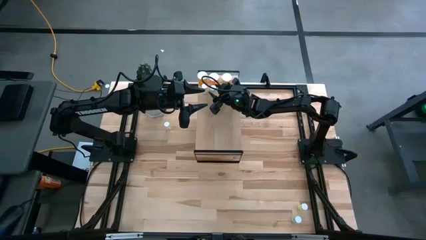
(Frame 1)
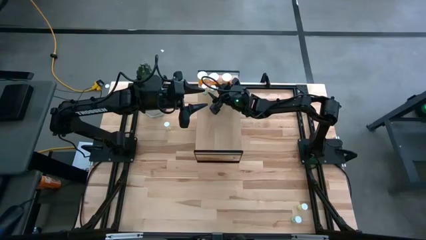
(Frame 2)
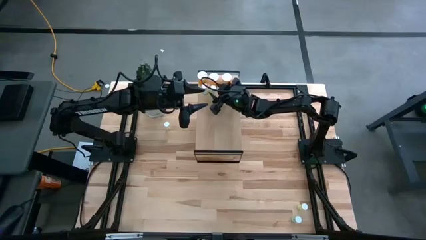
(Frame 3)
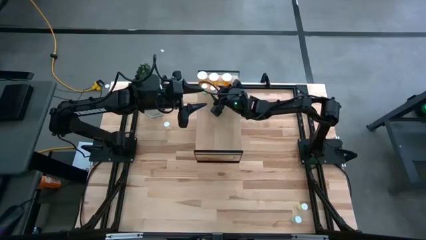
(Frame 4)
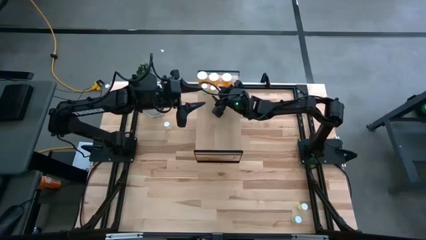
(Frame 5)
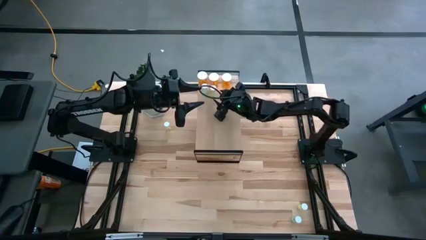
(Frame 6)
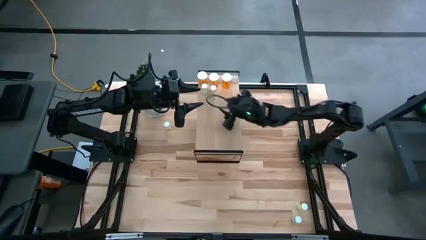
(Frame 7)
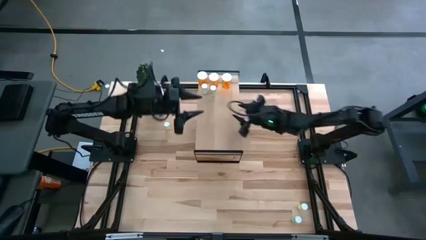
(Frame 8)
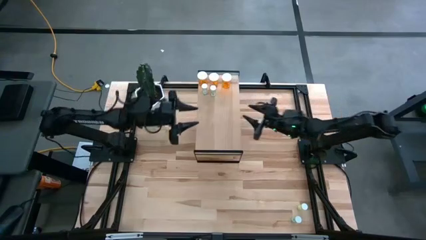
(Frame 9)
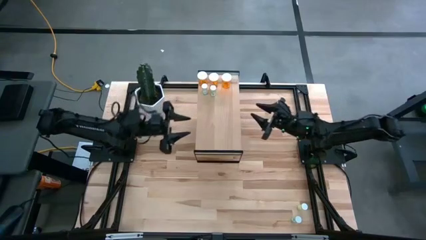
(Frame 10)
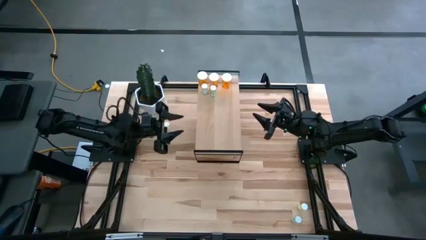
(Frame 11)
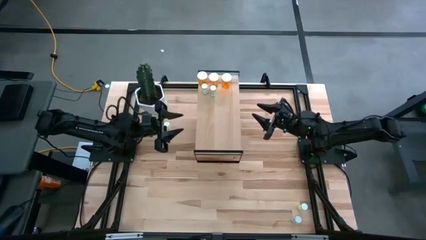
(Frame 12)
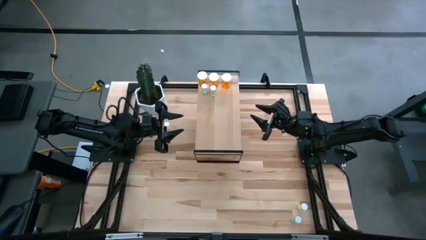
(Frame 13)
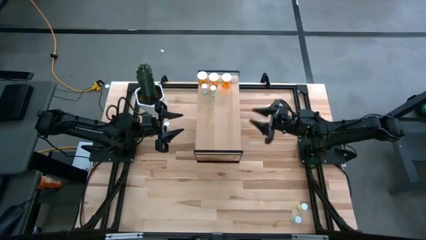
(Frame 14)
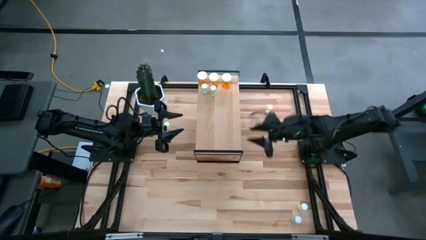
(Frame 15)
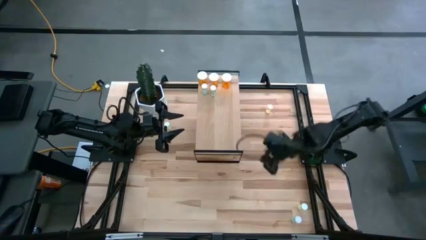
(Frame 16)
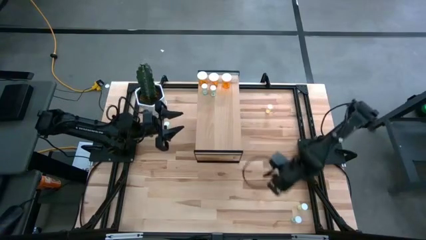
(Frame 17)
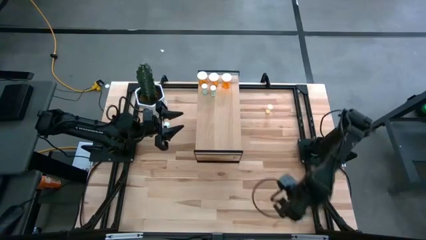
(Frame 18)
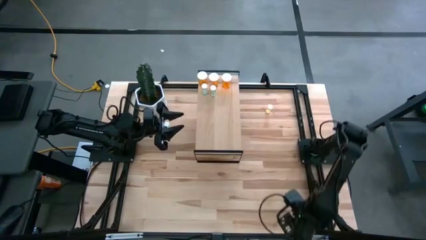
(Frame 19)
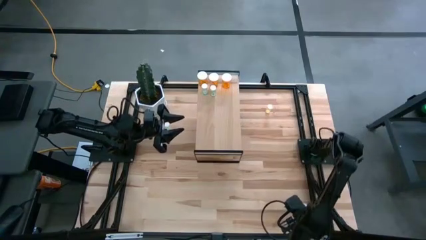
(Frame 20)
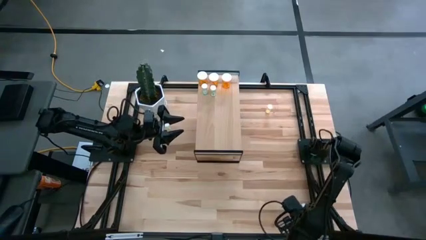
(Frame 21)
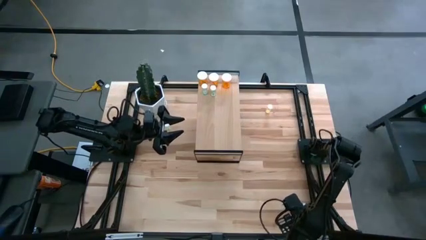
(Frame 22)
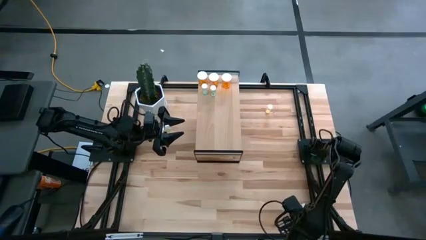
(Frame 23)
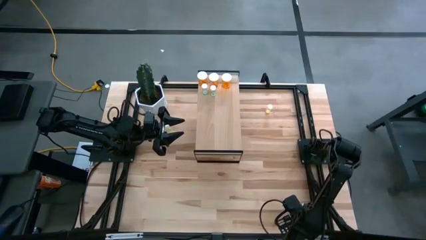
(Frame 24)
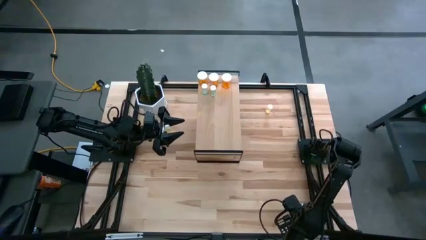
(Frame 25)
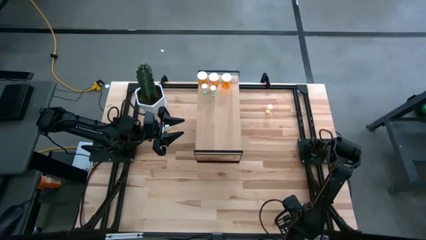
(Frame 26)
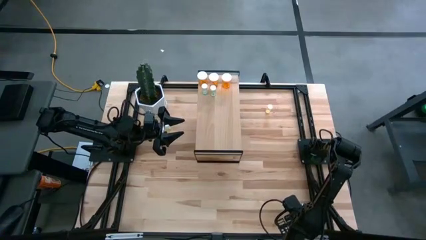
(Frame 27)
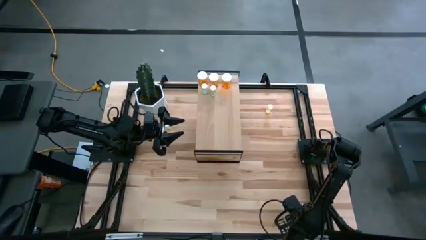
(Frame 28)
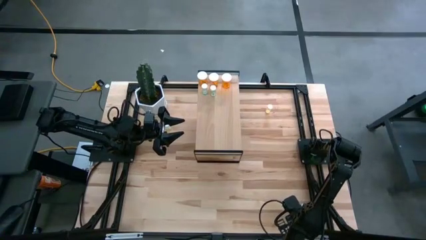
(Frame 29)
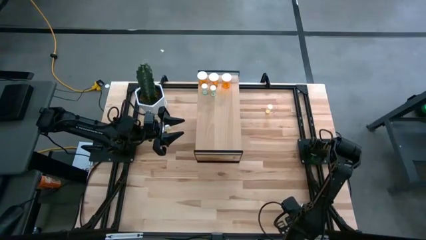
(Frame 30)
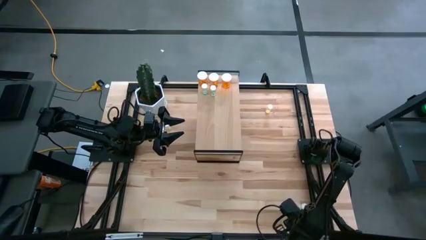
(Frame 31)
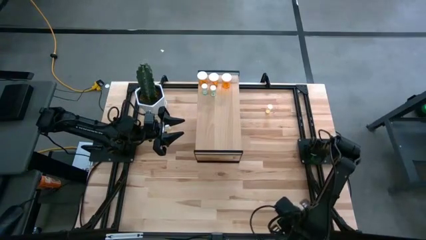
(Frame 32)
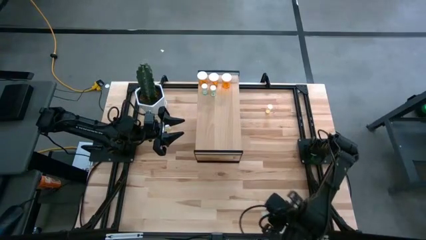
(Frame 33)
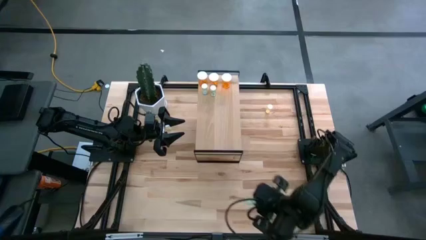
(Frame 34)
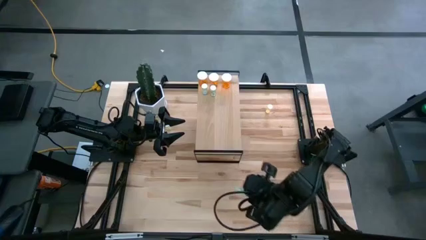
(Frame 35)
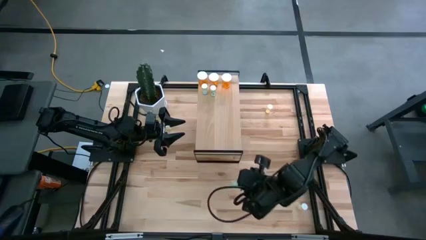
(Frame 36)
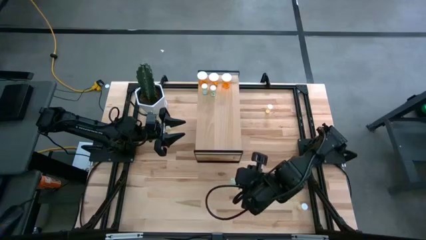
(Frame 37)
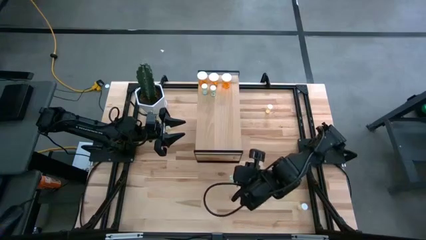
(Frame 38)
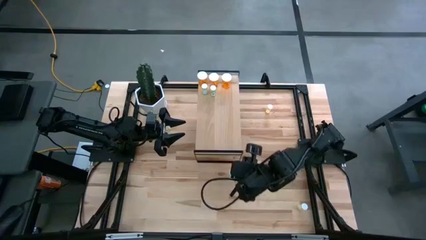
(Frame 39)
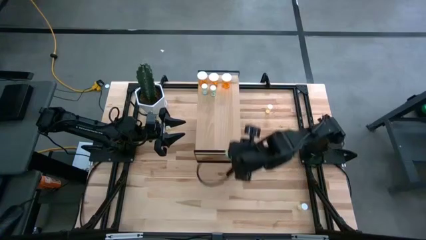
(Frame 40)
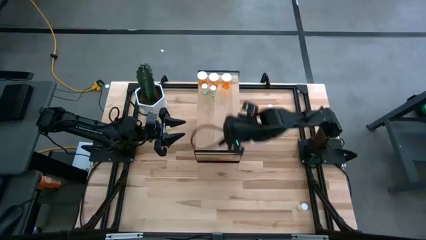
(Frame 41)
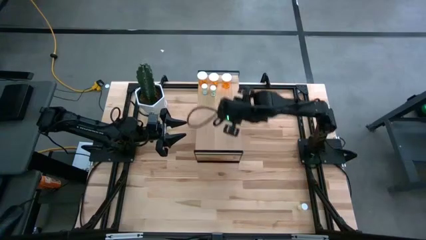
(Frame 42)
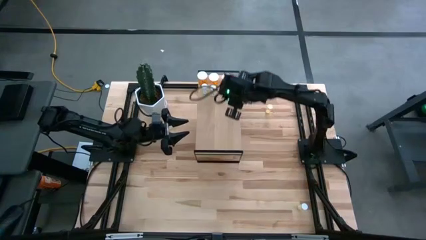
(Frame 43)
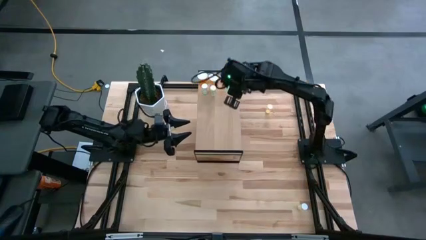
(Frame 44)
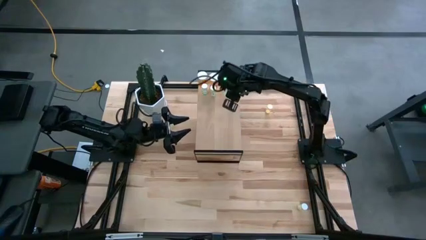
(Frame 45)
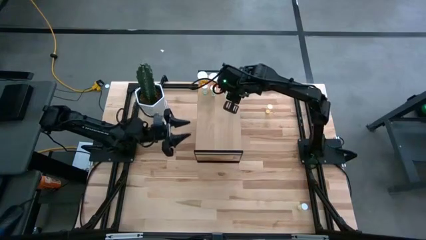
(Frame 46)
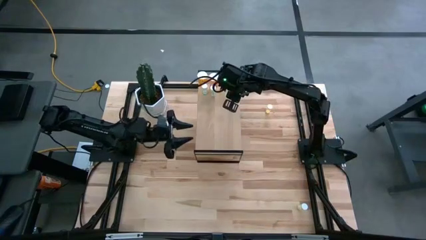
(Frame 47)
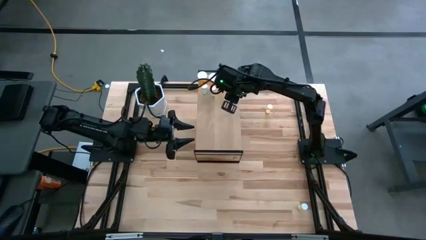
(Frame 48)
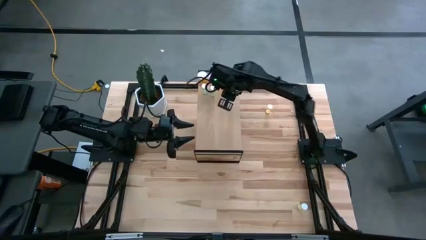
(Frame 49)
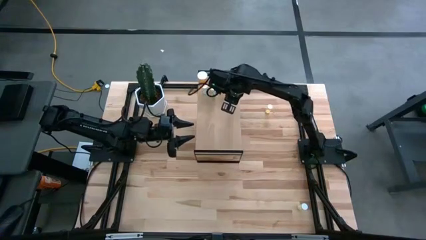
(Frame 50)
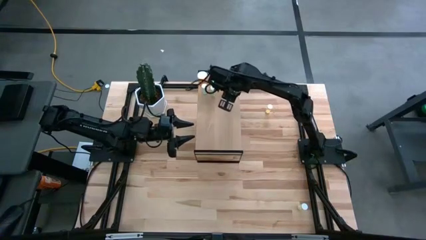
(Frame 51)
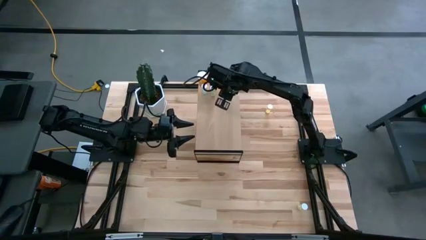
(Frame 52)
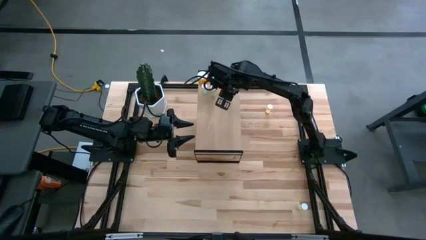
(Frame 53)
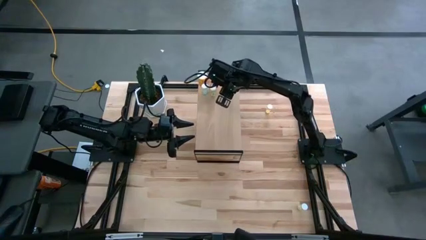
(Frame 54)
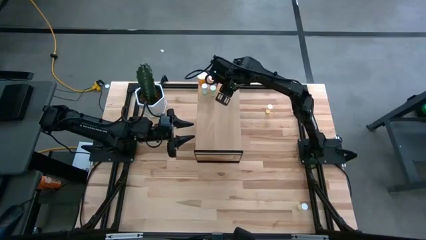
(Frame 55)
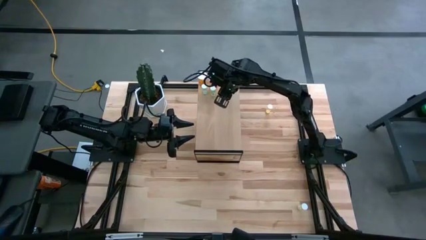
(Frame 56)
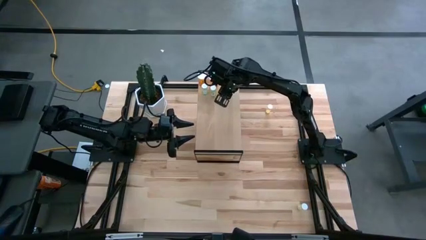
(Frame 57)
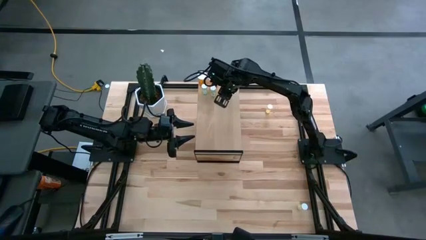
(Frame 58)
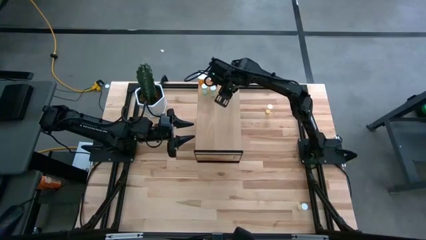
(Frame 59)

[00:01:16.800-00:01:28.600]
Task: Pick and place medicine bottles onto shelf by color
Put the green pill bottle on the shelf aligned with the other green pill bottles

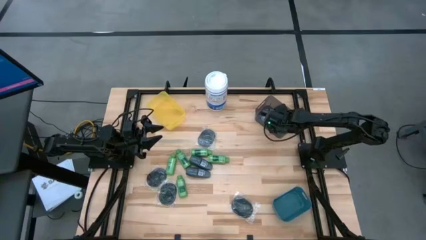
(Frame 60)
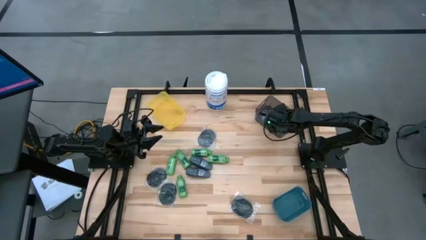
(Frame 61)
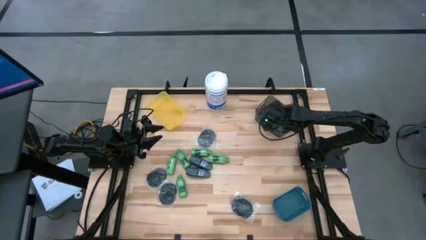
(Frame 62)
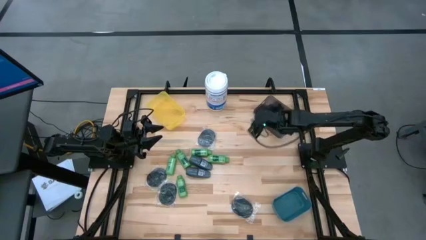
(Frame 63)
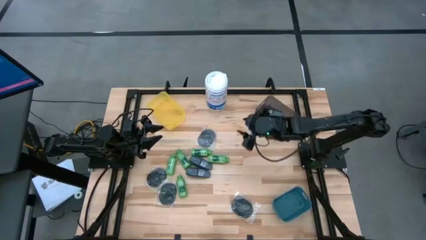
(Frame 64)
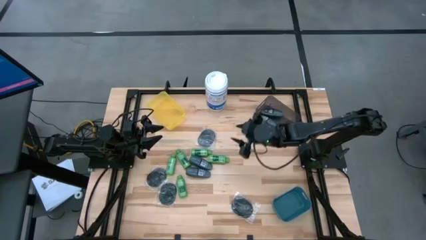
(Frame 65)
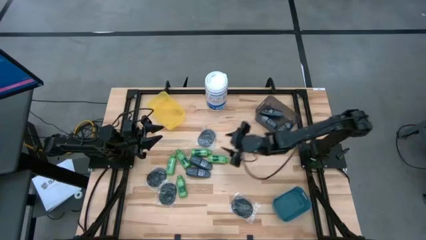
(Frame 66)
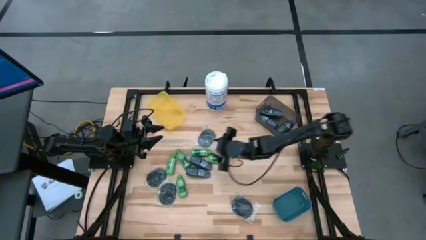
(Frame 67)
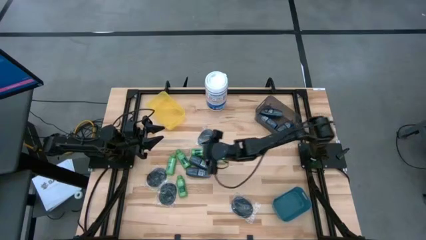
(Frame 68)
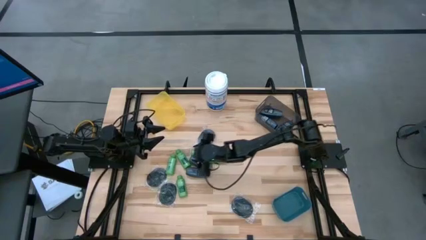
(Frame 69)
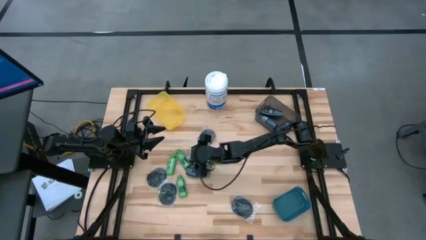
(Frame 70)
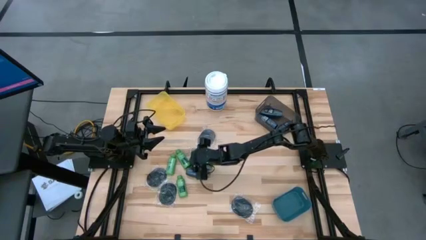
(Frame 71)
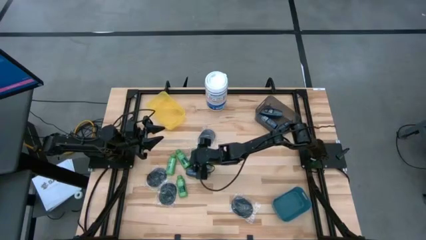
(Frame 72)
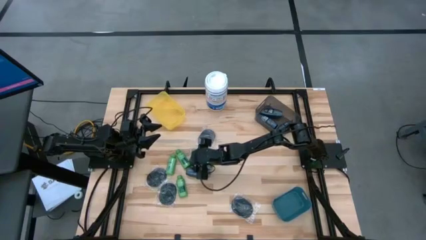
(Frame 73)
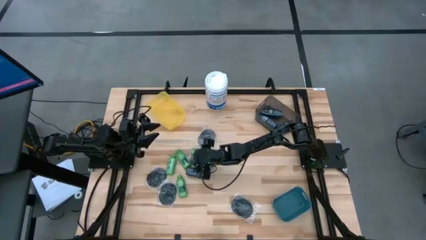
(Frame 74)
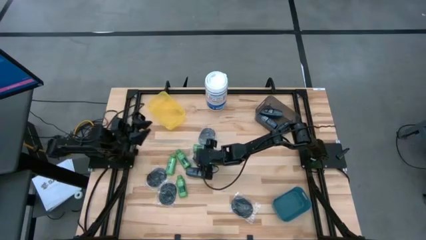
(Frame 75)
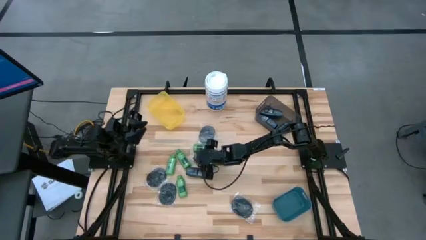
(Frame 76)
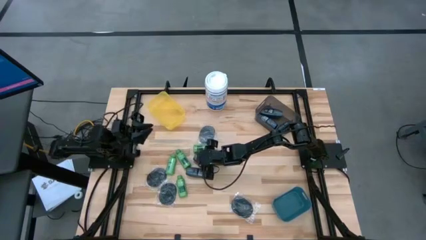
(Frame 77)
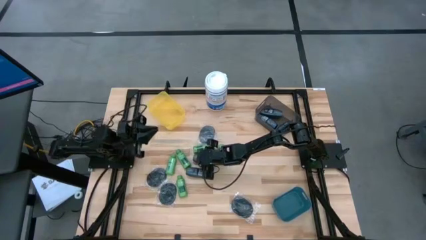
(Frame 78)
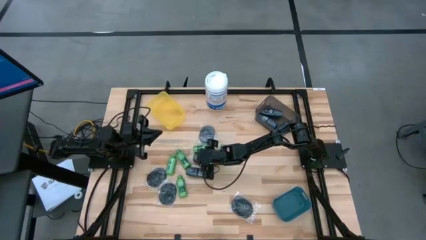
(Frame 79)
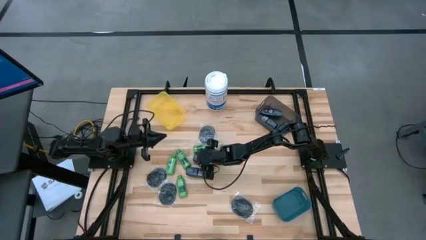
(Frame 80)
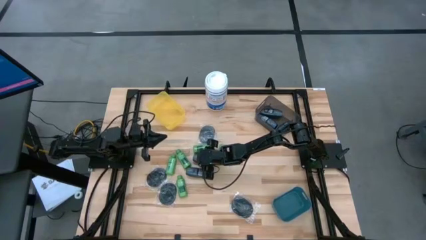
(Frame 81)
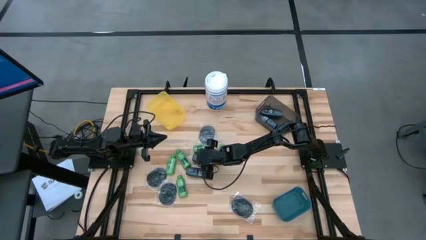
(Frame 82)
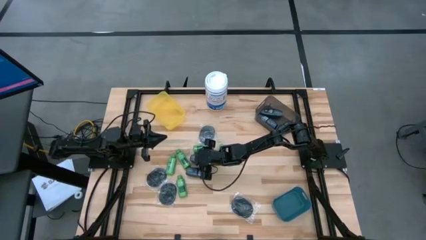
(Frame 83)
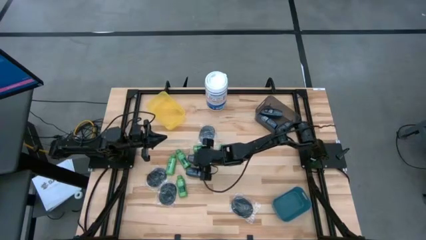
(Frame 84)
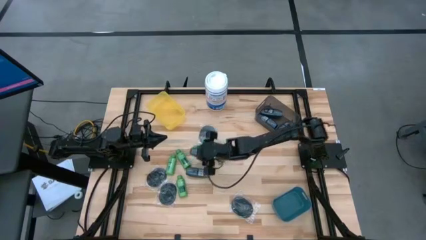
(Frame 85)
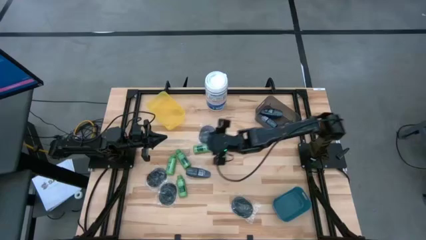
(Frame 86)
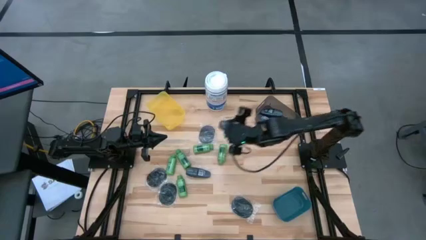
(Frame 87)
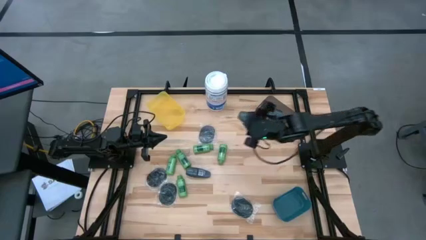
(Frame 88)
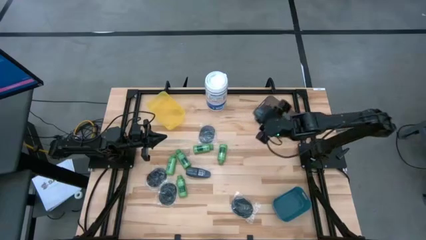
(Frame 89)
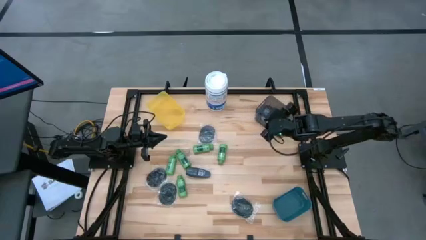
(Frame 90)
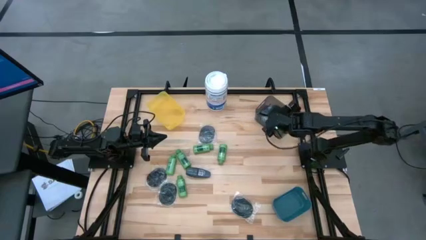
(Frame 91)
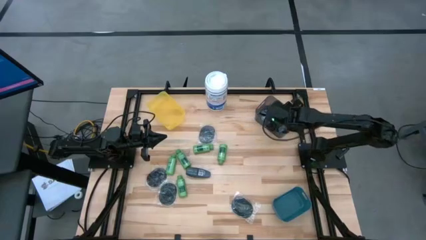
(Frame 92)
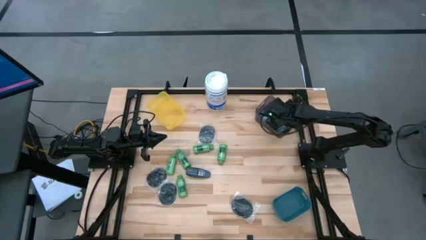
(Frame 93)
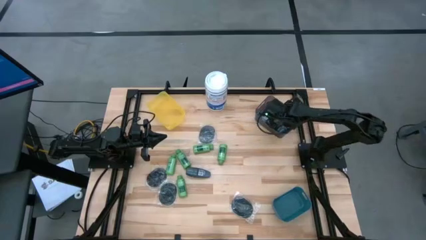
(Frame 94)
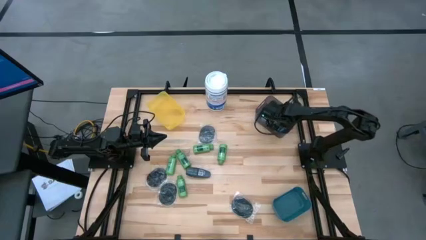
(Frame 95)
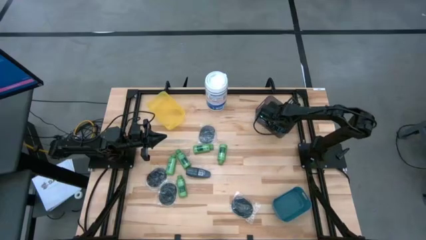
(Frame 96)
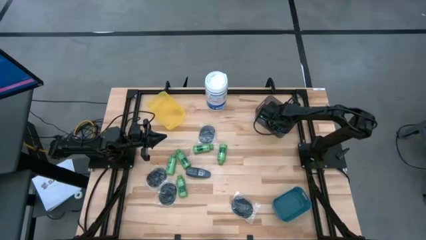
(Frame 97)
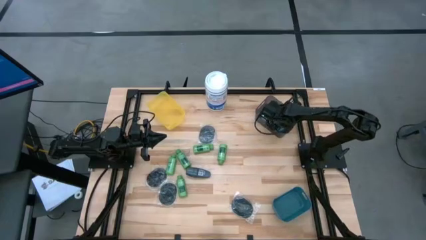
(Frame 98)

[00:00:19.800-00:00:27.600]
Task: Pick & Place Travel size toiletries
Put the gray deodorant into the black bin
